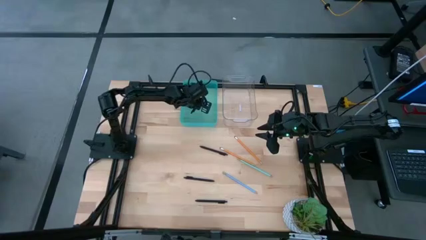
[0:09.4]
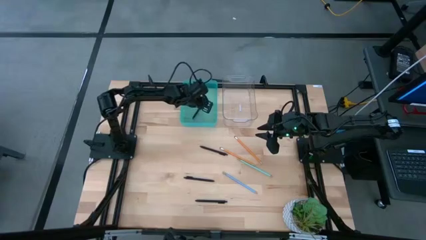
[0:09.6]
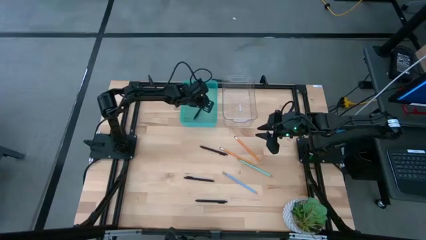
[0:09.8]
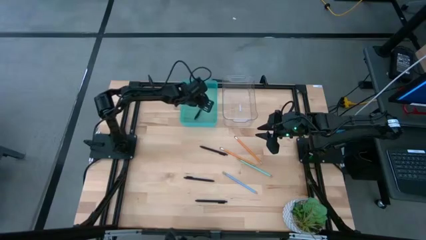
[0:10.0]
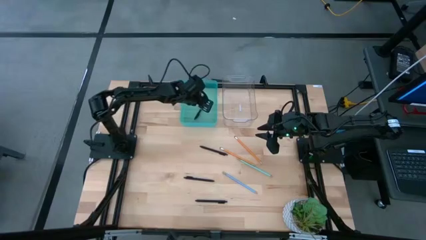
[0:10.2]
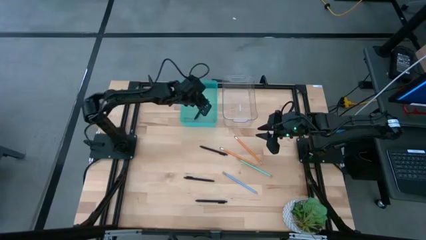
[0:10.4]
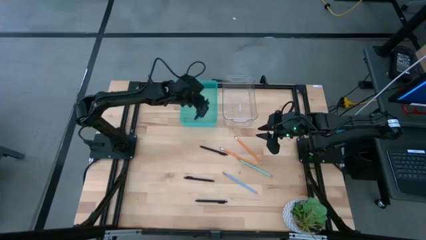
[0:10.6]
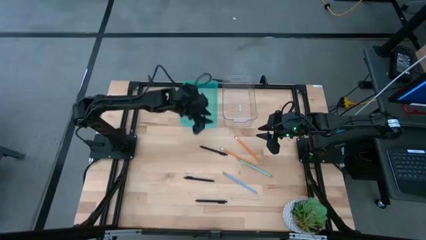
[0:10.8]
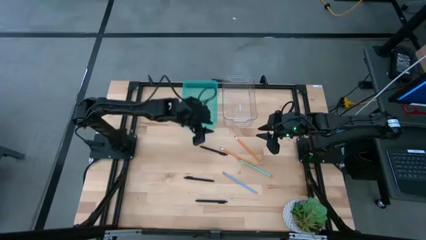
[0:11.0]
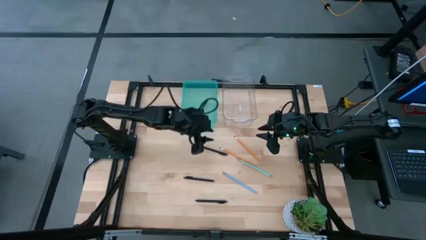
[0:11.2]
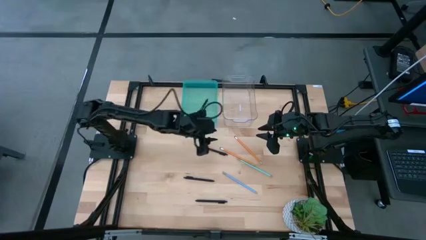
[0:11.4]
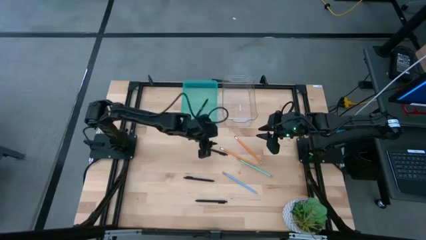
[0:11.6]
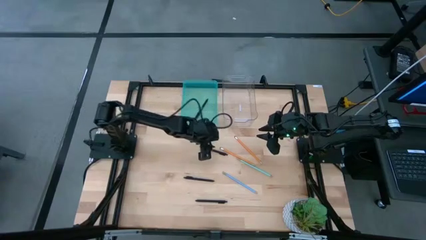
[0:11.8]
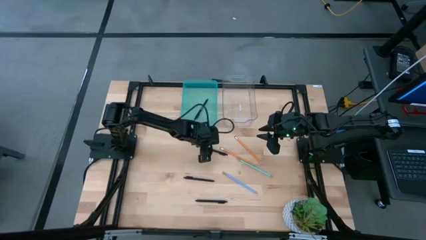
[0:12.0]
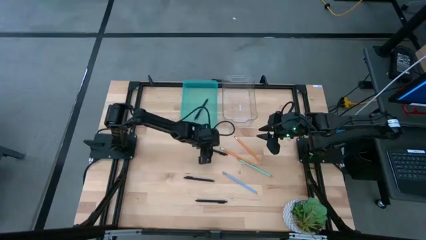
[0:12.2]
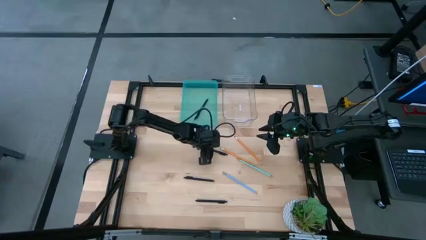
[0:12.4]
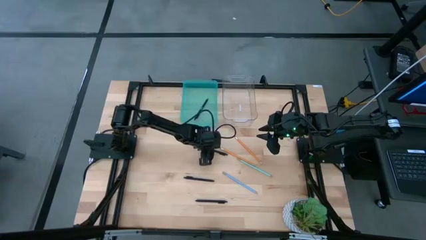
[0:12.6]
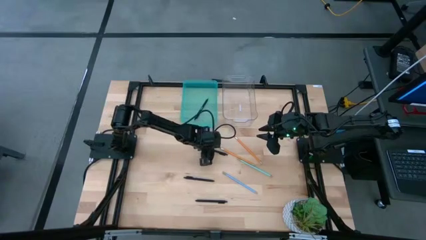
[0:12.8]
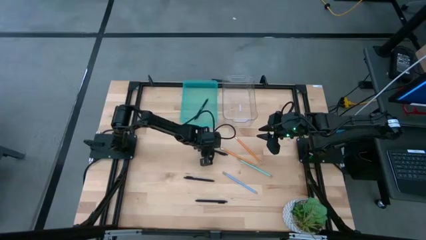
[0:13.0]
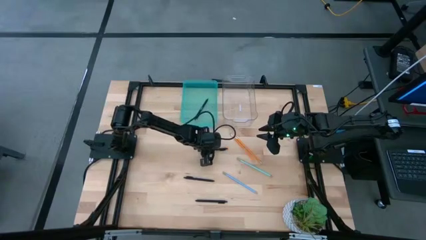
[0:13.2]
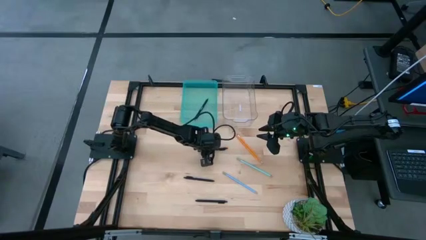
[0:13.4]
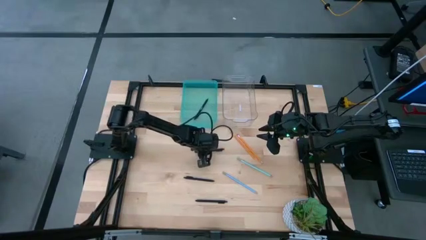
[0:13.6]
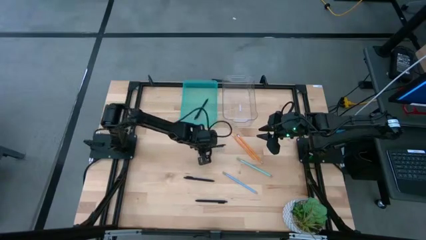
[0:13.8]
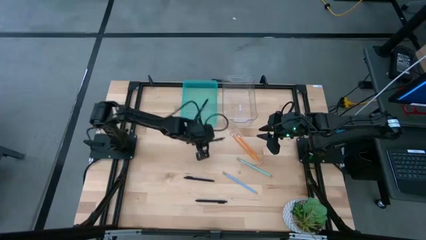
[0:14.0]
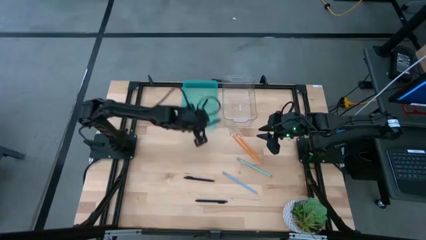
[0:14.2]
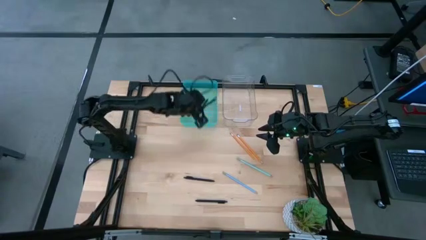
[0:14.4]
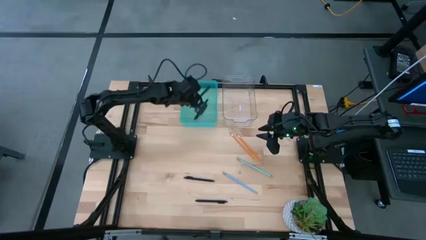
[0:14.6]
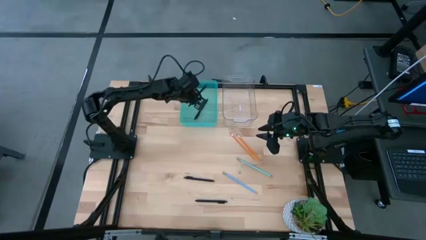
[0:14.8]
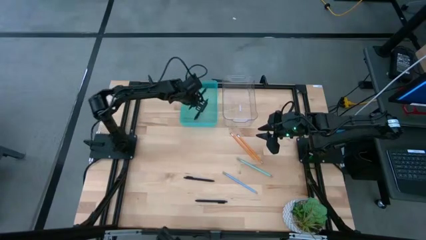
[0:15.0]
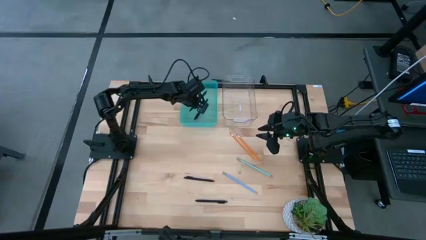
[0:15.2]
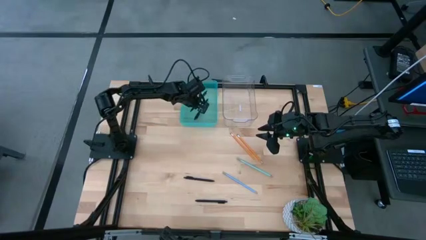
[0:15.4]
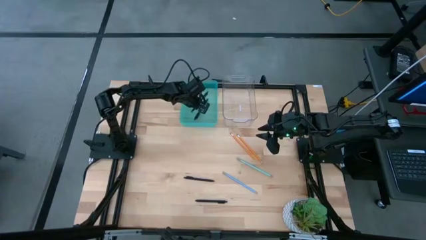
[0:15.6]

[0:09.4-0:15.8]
Task: Sort pens & pencils
Put the top black pen into the light blue bin

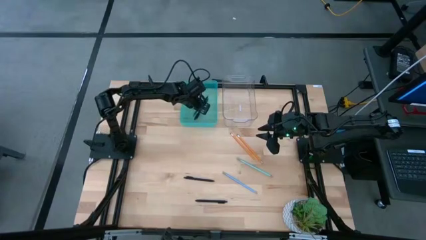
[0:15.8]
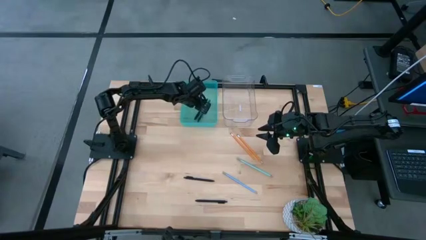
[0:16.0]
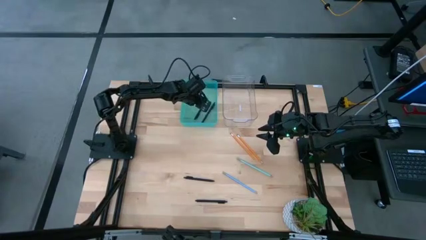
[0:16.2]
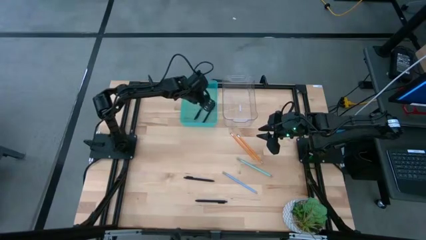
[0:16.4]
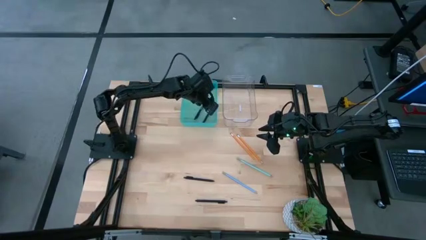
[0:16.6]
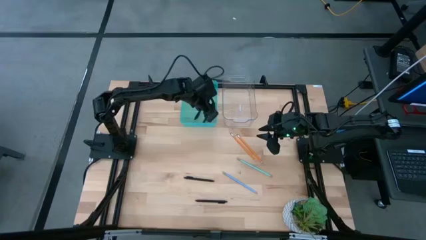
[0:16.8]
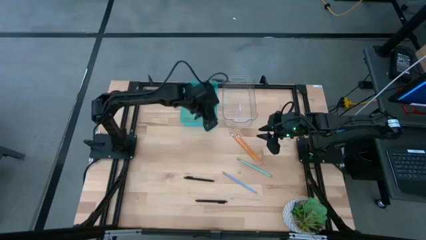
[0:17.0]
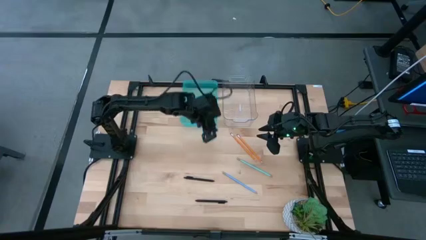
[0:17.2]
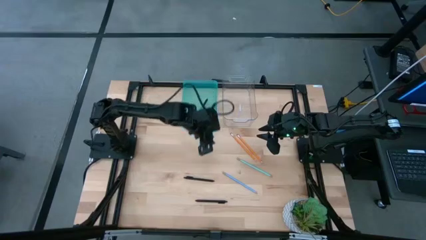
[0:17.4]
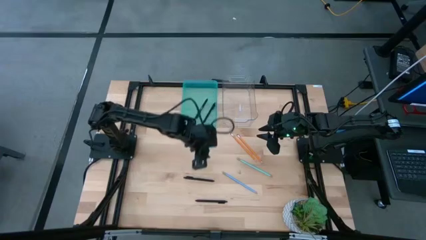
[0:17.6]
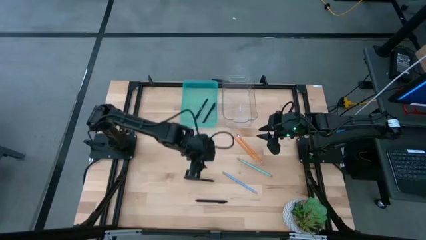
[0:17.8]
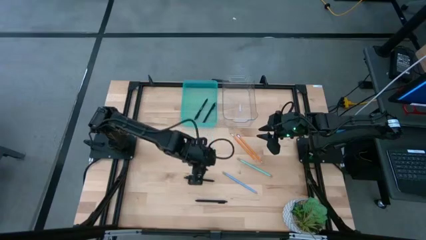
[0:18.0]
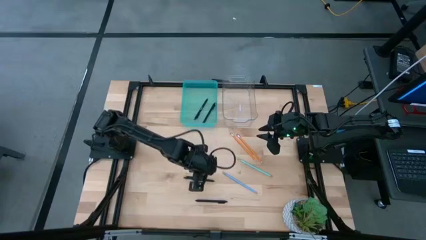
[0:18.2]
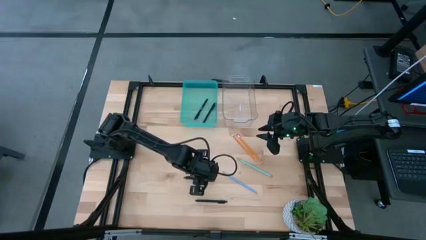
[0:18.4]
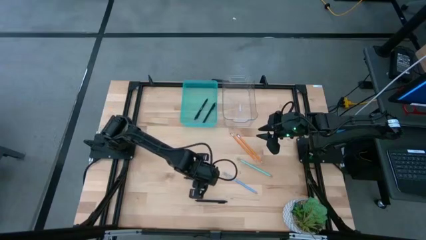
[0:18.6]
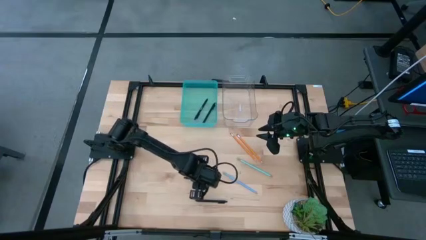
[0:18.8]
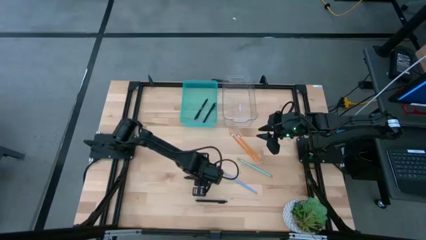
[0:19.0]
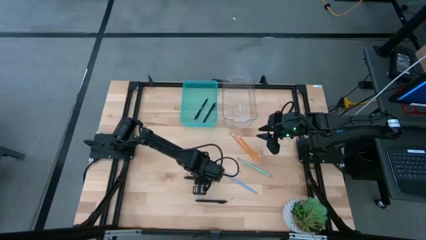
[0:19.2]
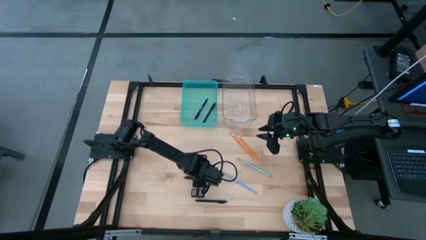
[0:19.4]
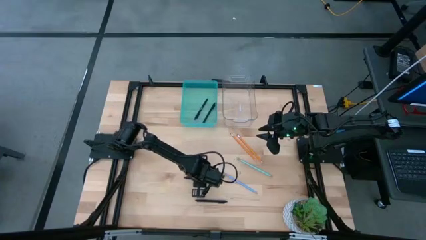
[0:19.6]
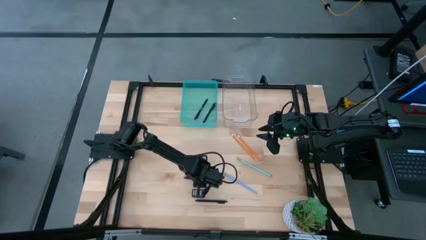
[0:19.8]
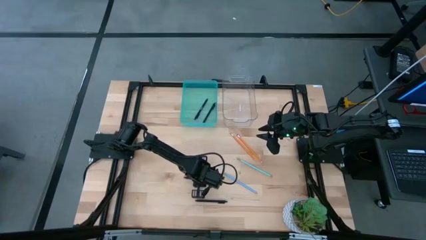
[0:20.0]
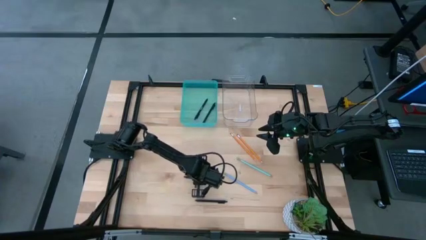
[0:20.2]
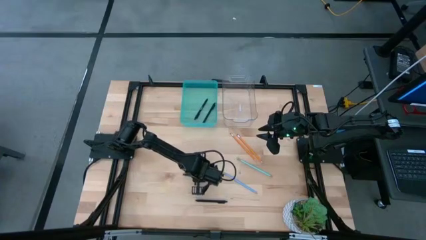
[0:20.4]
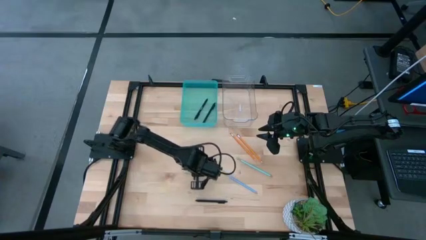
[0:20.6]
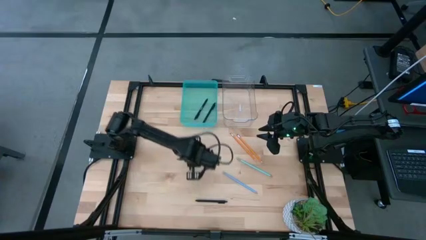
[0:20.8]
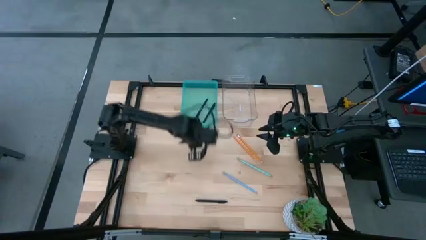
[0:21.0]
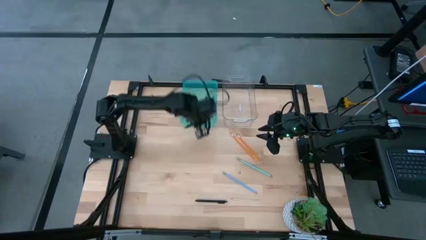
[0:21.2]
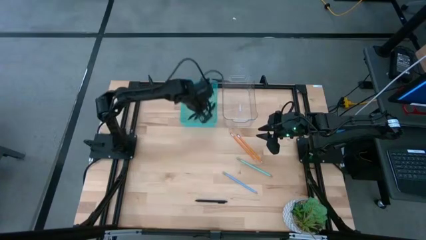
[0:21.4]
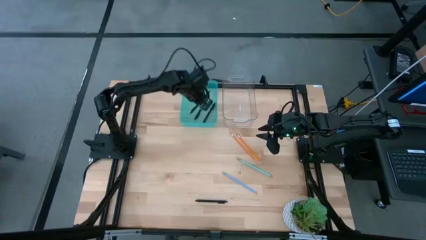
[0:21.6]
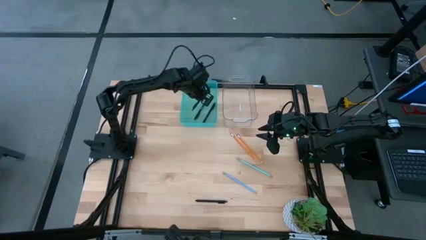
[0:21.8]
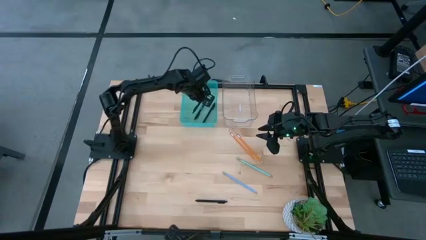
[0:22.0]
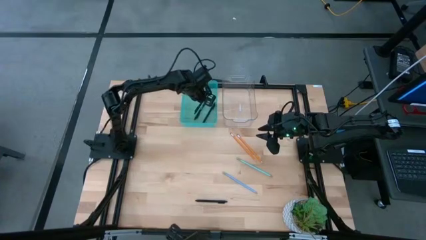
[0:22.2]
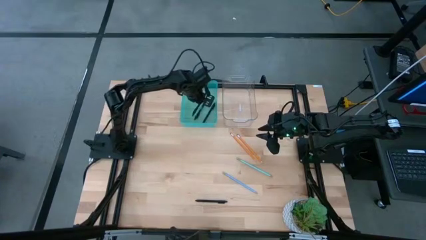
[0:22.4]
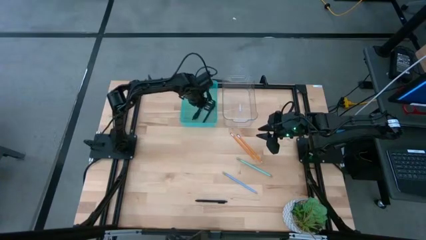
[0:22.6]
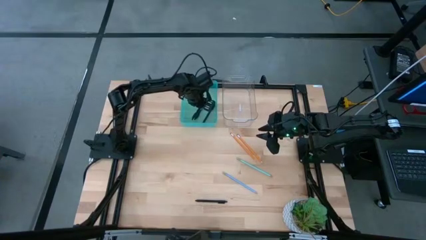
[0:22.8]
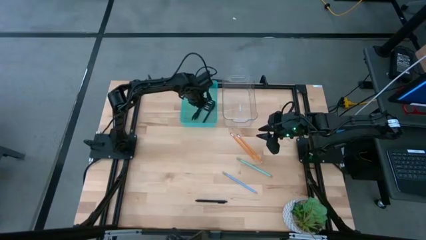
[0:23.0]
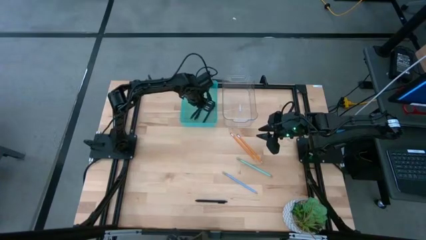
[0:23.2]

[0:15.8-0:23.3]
Put the top black pen into the light blue bin

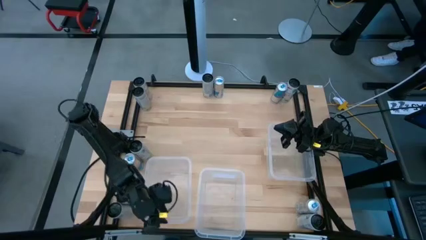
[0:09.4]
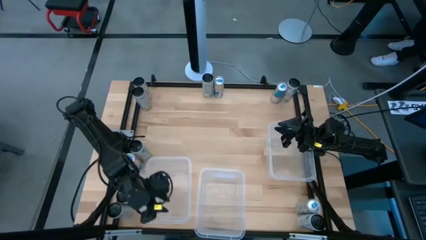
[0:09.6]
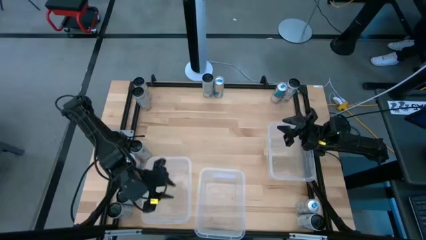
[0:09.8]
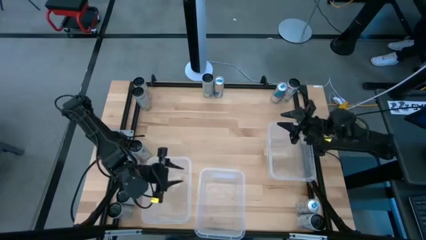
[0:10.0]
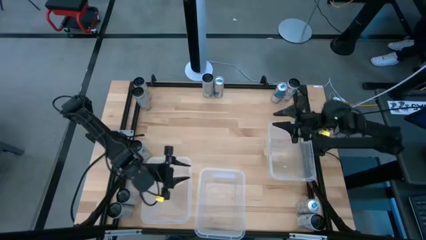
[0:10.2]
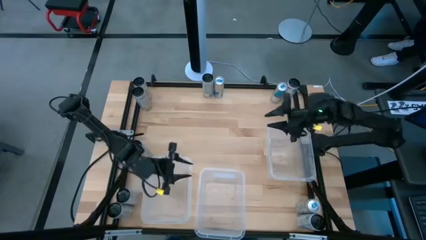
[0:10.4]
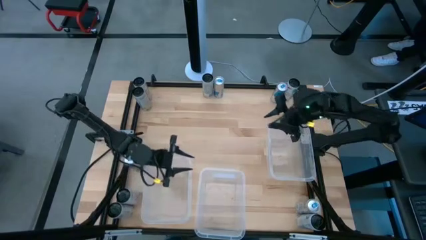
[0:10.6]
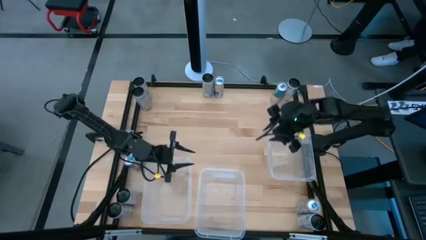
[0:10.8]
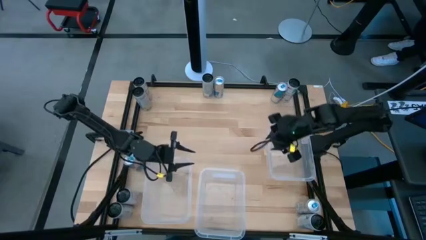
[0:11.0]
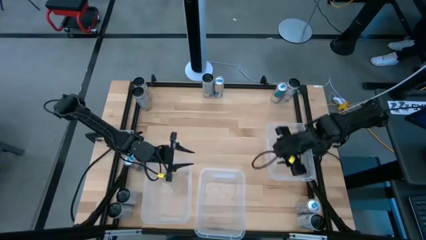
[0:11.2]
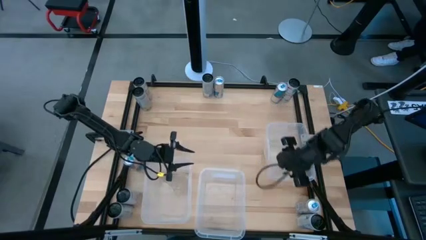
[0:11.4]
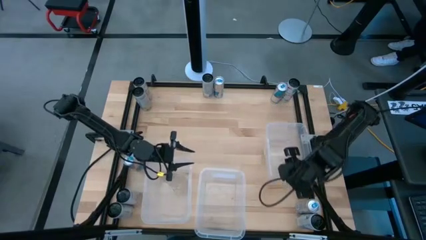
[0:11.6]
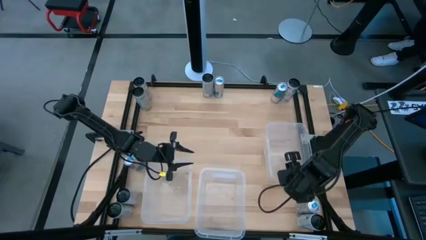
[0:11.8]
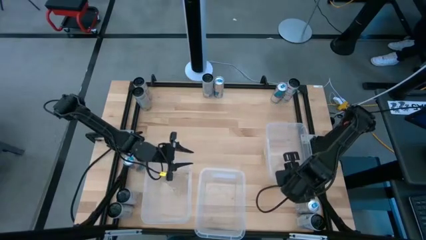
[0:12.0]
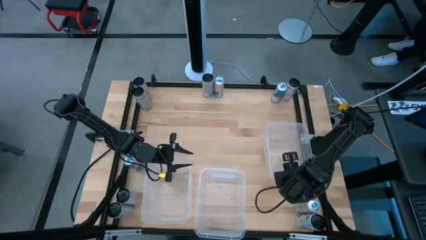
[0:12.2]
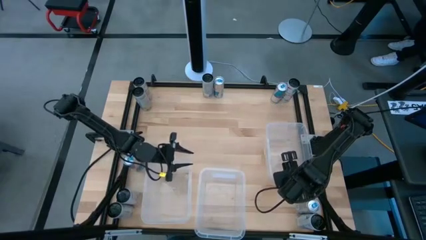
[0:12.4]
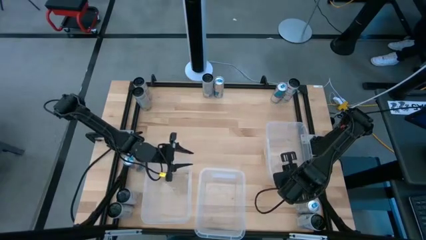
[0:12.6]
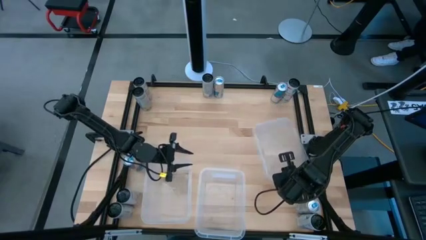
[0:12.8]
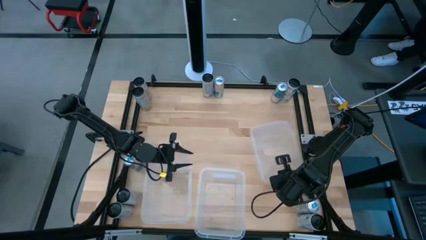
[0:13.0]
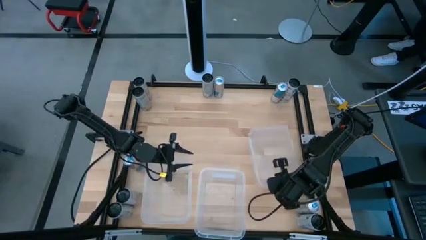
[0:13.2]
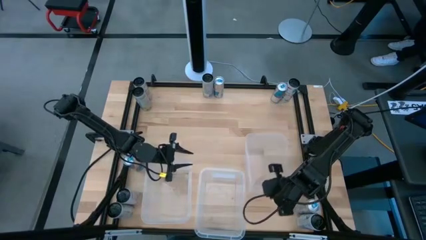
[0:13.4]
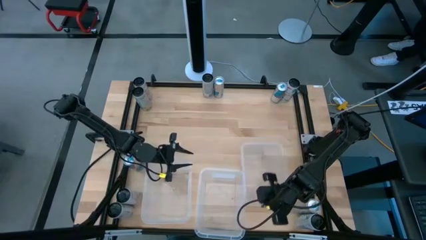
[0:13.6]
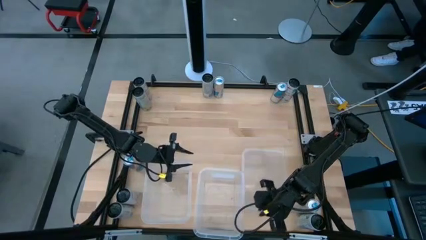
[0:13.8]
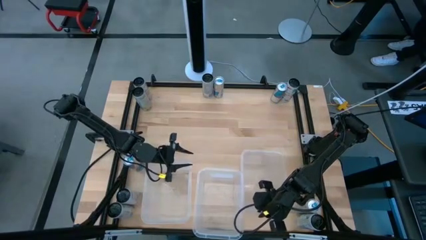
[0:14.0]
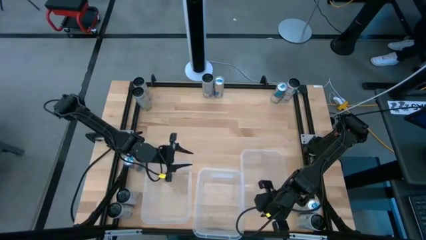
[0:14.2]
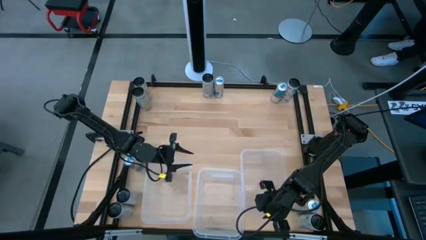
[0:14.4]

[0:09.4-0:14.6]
Task: Sort soda cans
Move the top transparent bin to the bottom right of the table
